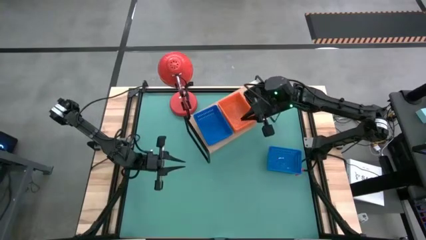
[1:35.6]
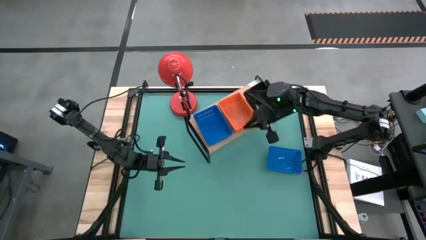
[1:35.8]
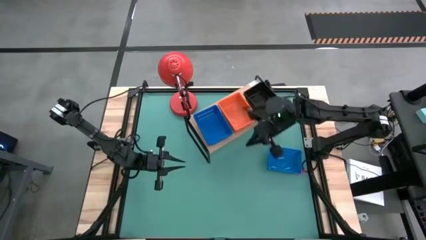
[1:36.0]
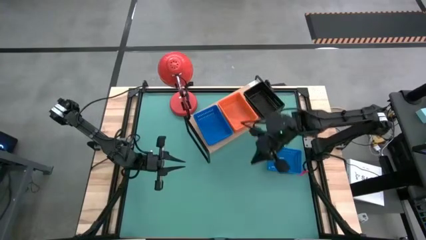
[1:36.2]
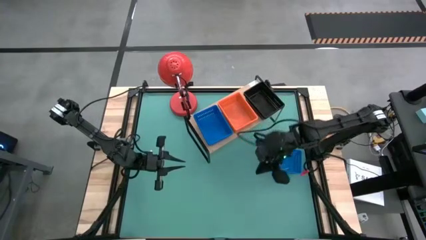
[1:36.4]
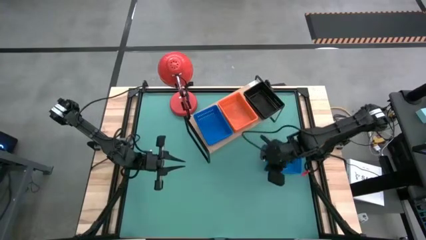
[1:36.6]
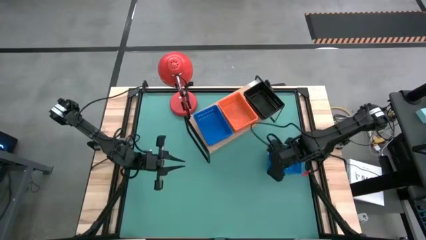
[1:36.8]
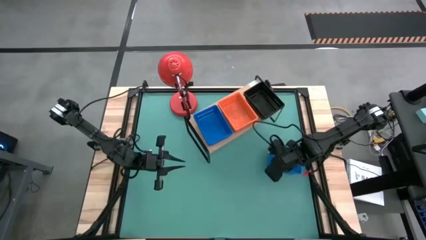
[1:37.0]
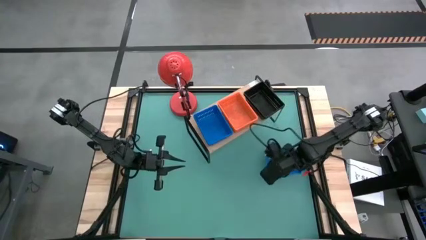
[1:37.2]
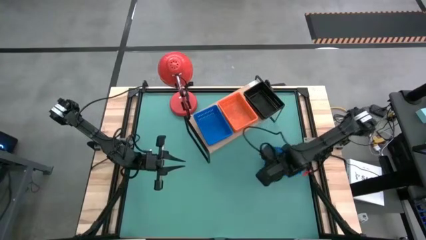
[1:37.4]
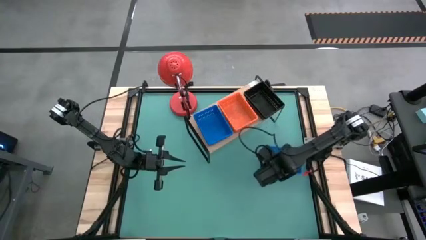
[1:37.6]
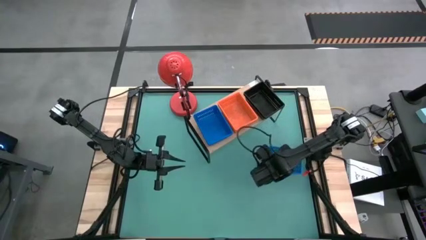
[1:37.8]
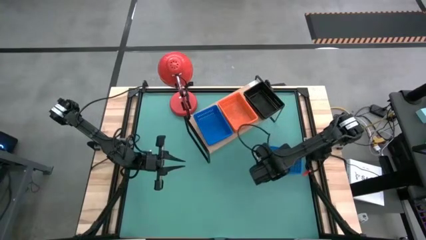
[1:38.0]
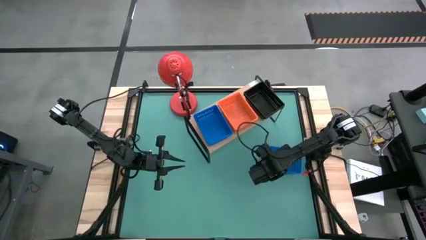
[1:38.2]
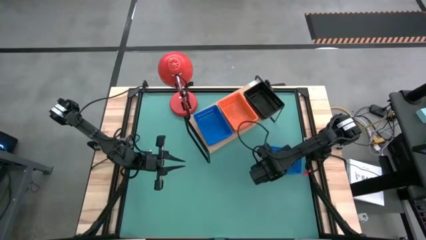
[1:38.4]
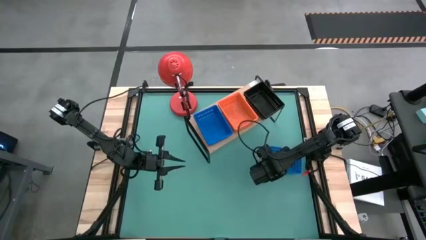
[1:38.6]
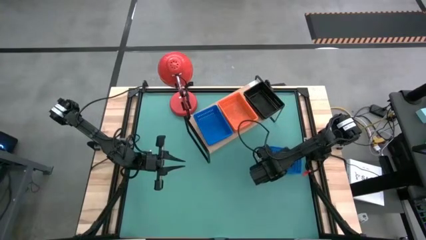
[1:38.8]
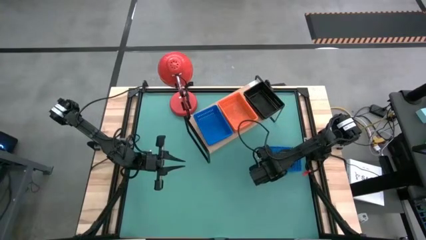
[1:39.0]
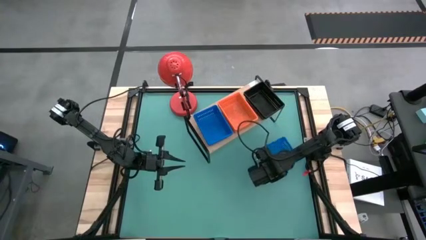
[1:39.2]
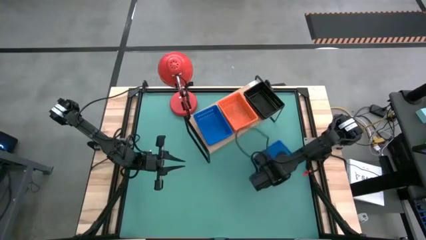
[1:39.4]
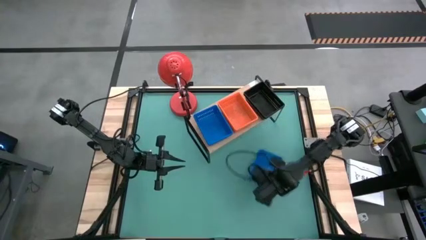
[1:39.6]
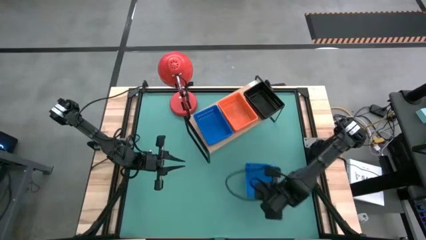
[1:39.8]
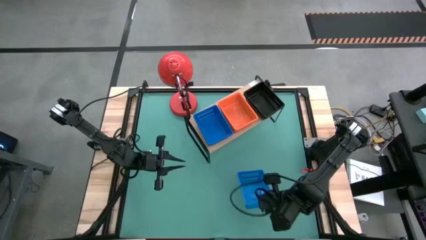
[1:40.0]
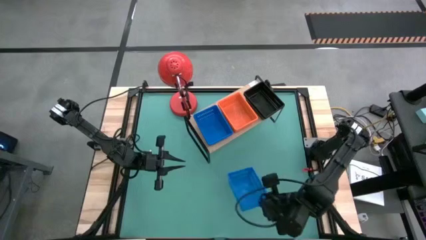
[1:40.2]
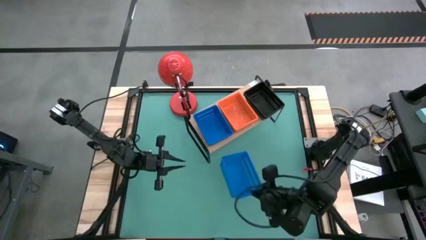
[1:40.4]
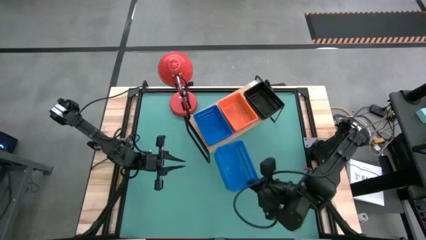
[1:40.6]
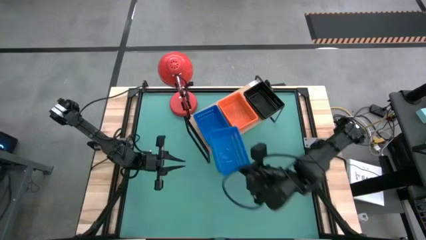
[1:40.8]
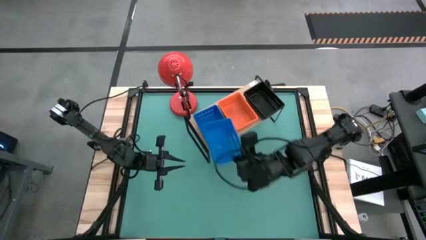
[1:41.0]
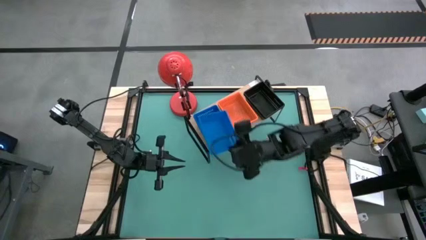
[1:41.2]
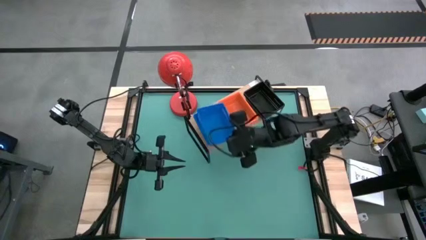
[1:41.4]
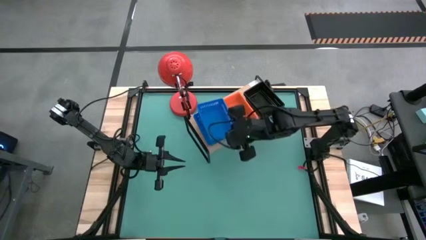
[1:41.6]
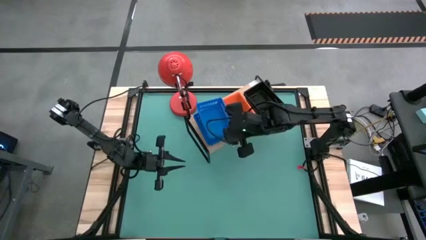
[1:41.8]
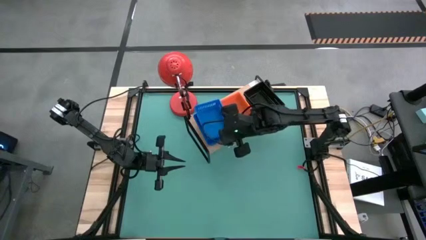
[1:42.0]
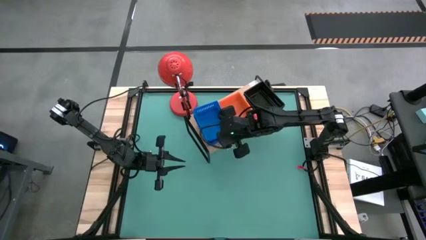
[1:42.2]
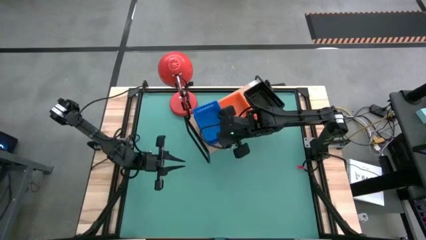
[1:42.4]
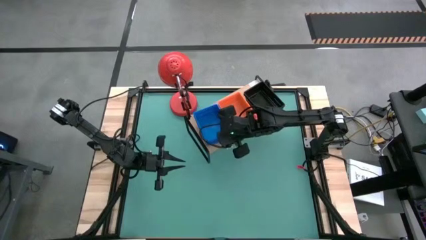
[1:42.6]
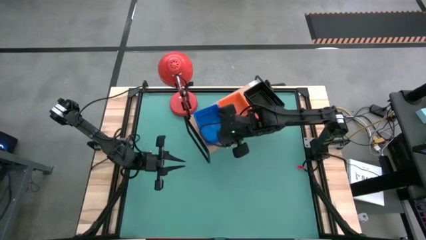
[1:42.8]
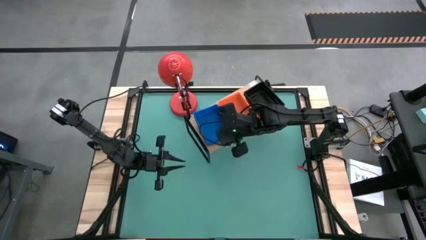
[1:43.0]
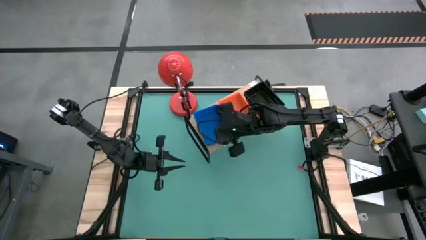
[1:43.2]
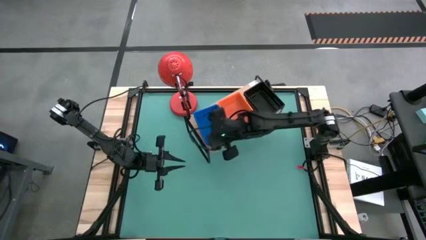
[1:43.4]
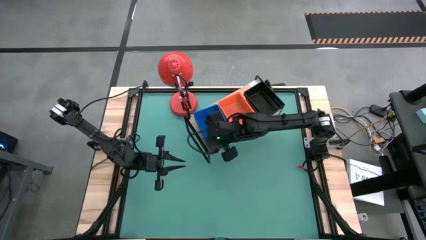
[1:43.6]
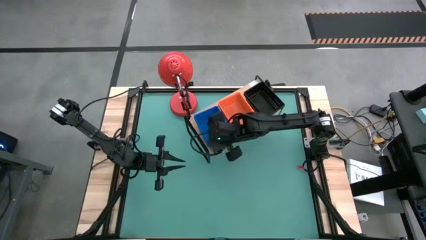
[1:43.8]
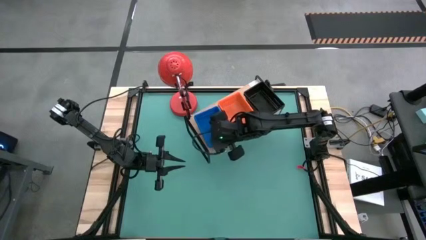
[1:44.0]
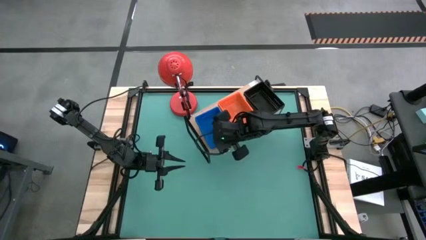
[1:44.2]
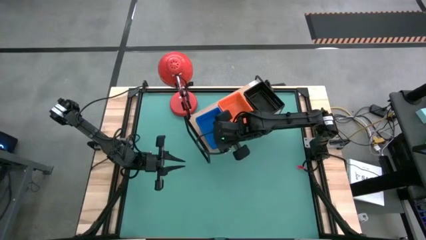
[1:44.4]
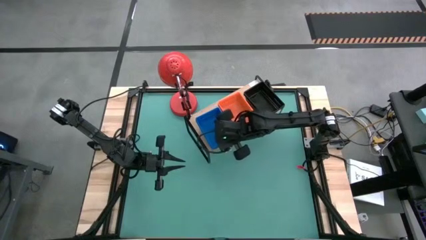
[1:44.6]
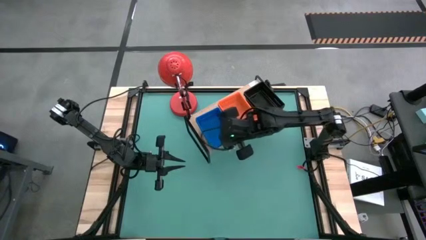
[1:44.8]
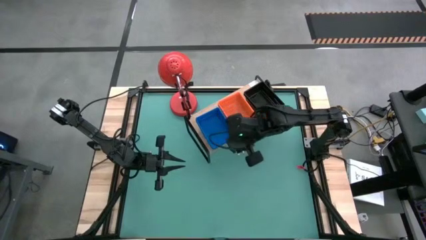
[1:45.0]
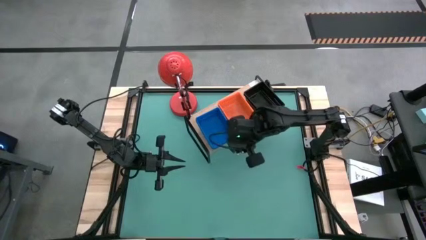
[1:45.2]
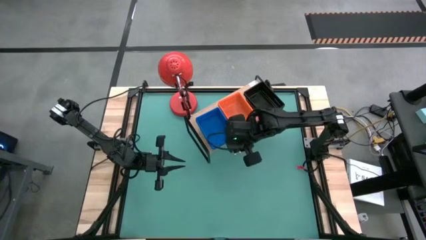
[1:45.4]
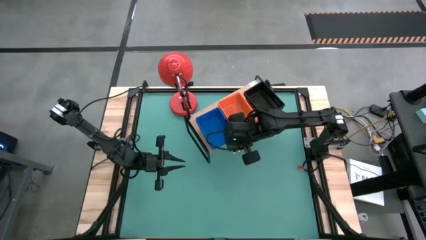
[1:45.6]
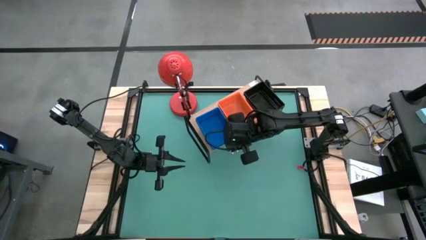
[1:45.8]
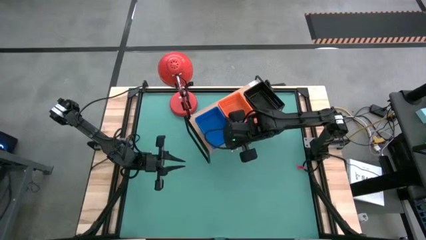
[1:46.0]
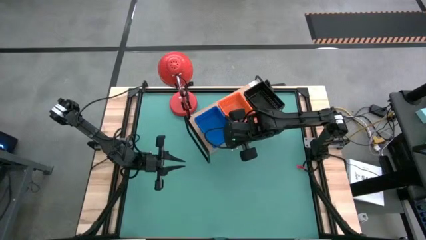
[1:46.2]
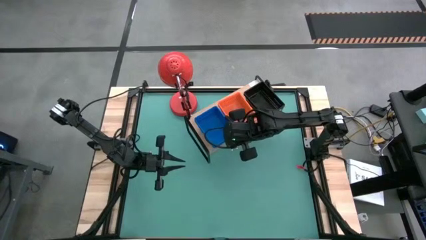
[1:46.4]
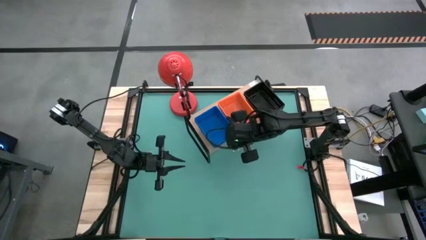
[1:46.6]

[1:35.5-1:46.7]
Task: Stack baskets on shelf by color
Stack the blue basket on top of the blue baskets on the shelf

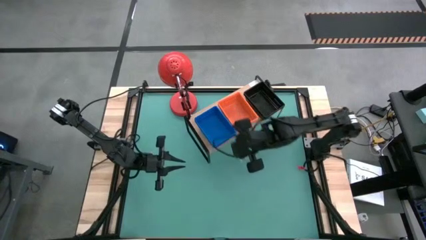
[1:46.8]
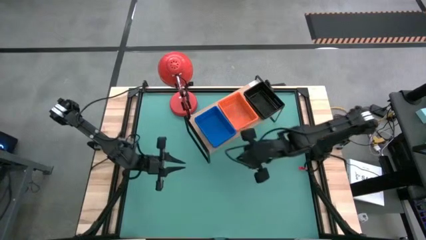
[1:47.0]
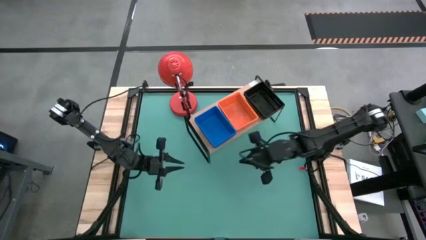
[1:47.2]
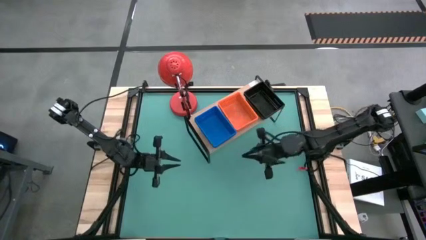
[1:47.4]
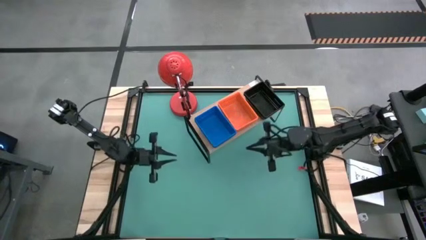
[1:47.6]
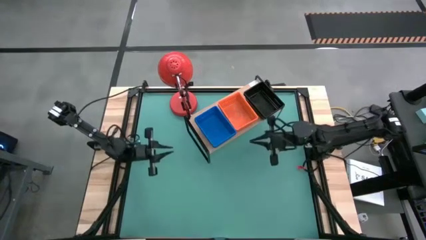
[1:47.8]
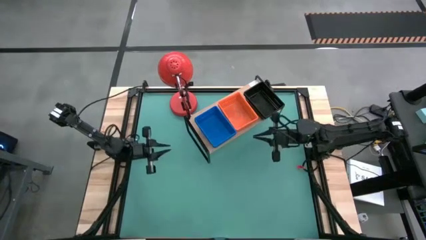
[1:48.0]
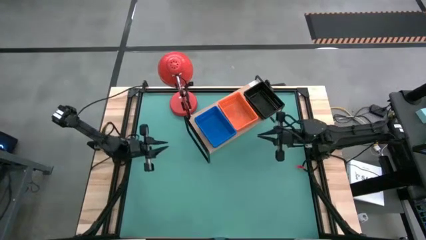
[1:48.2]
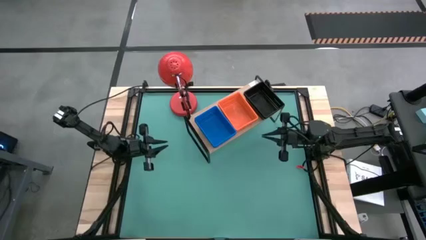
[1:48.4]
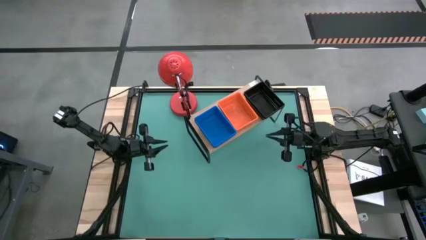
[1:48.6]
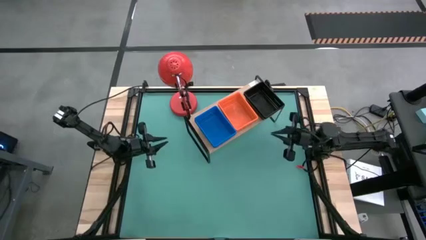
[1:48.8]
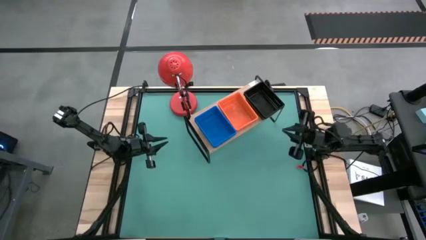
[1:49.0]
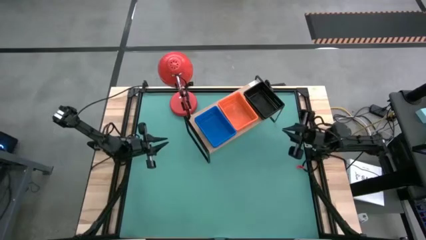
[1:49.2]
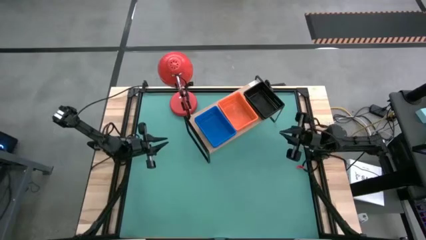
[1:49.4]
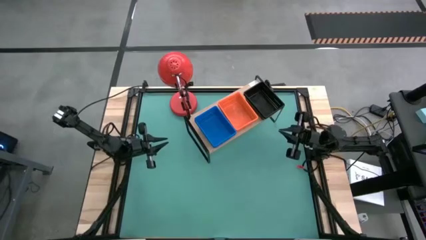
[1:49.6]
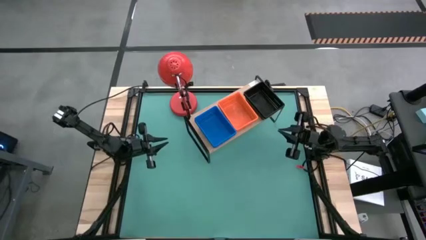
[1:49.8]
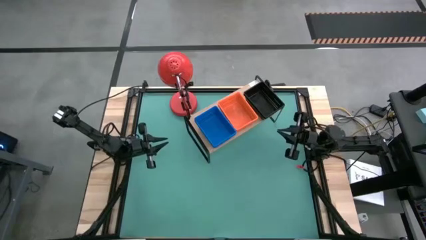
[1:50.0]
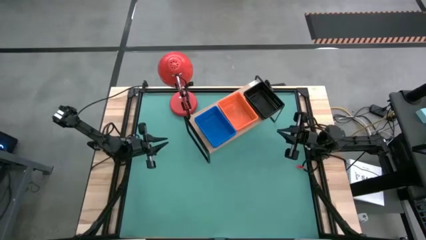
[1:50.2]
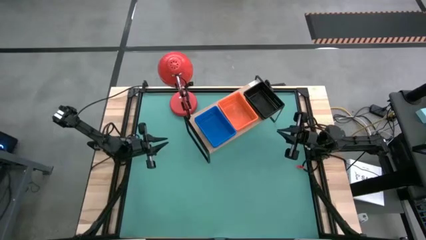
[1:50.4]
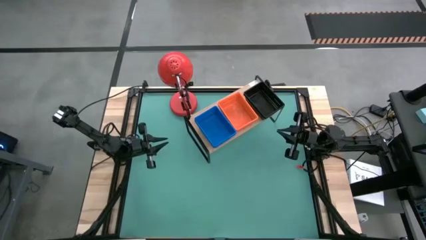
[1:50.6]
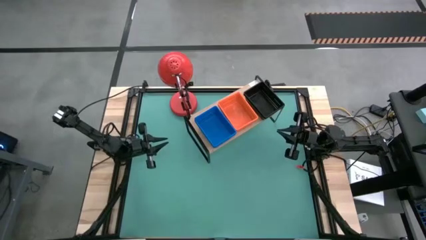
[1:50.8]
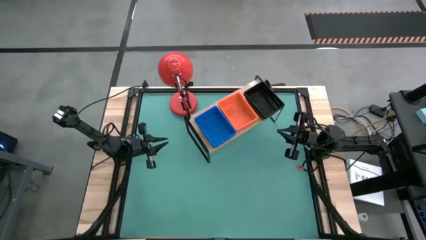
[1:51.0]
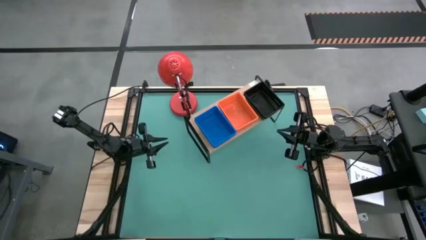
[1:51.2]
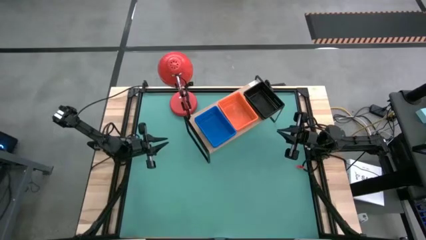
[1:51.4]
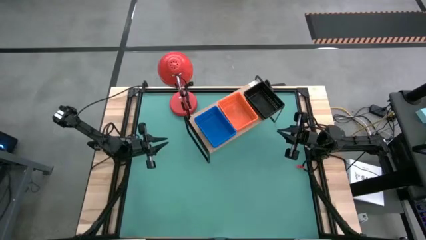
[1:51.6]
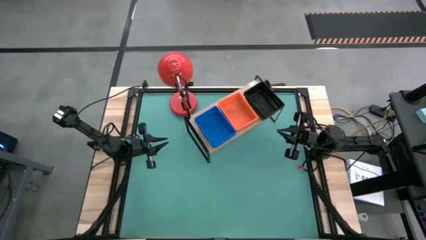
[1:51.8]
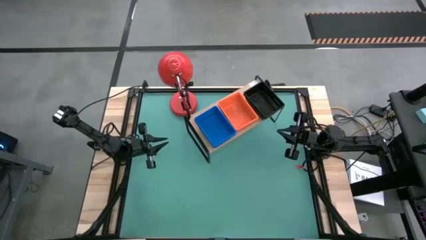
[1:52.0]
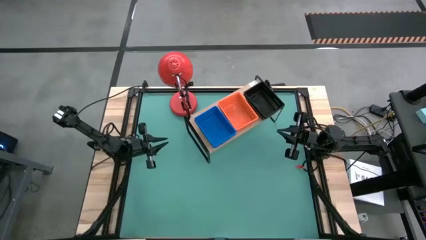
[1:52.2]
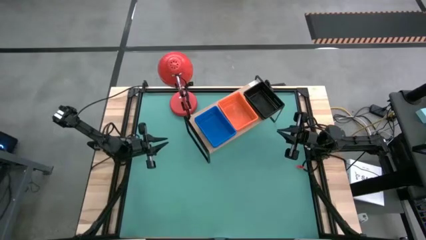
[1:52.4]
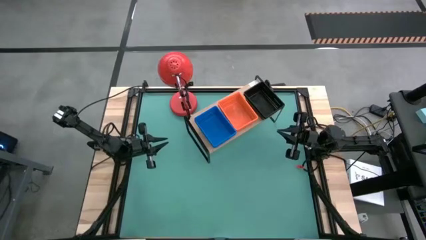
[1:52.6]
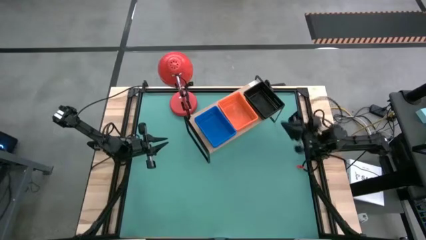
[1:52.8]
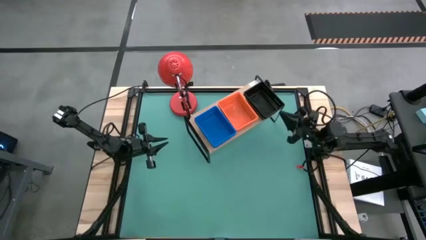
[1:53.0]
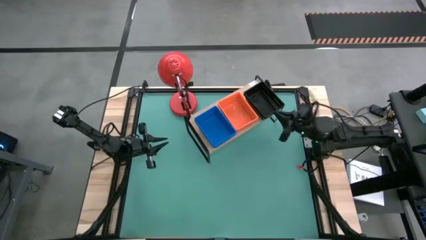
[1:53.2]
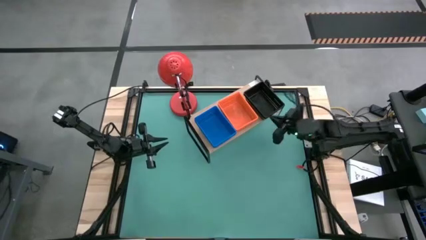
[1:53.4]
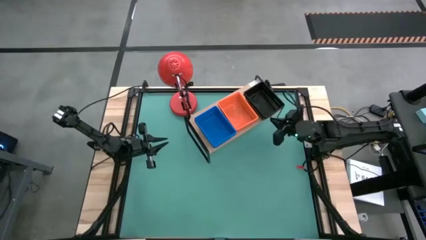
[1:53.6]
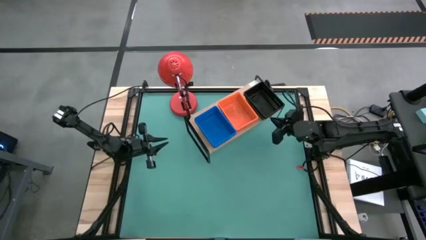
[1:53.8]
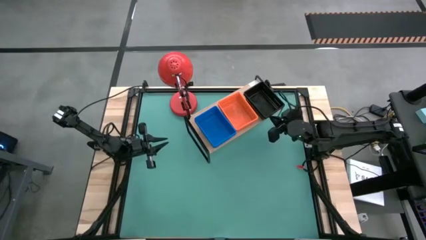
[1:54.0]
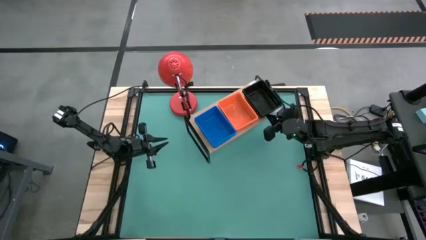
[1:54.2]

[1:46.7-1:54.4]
Adjust the stack of black baskets on the shelf
